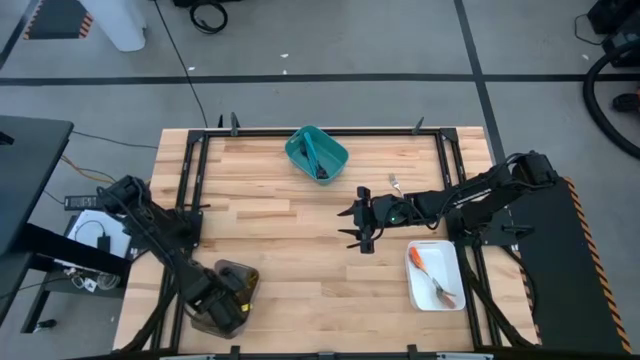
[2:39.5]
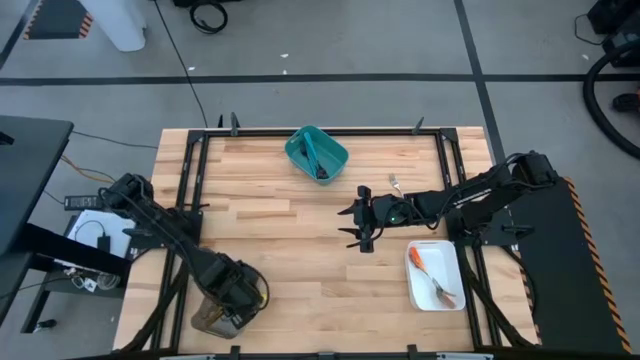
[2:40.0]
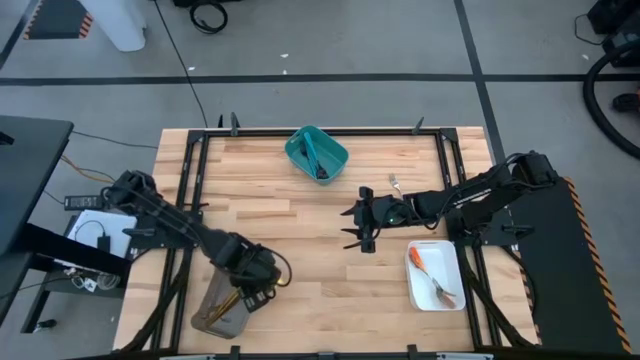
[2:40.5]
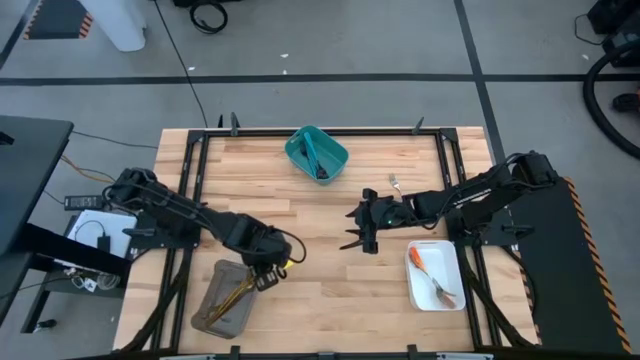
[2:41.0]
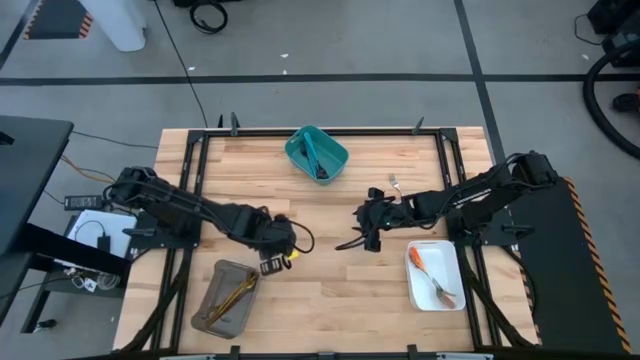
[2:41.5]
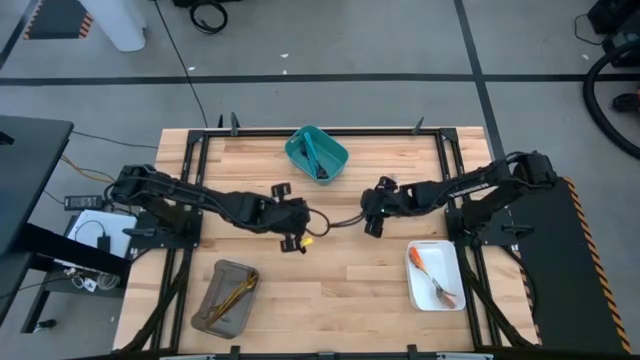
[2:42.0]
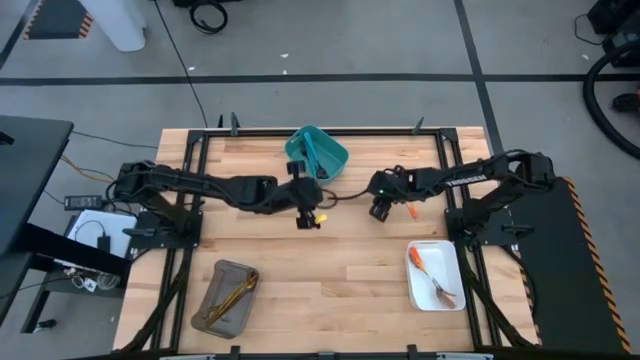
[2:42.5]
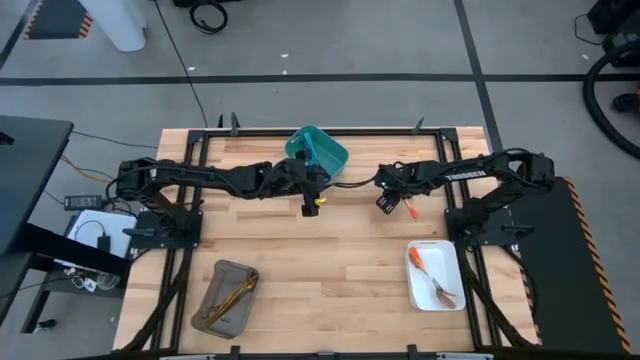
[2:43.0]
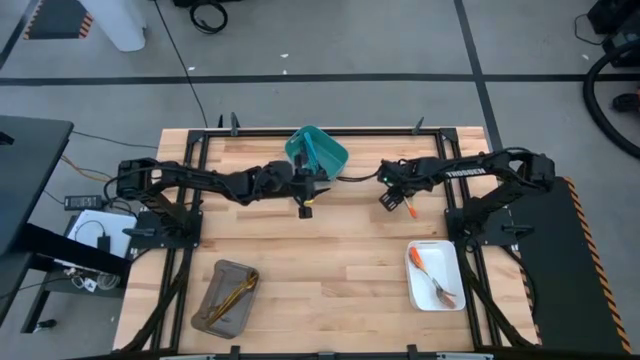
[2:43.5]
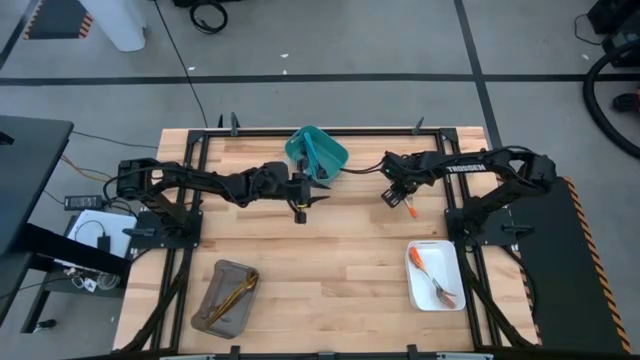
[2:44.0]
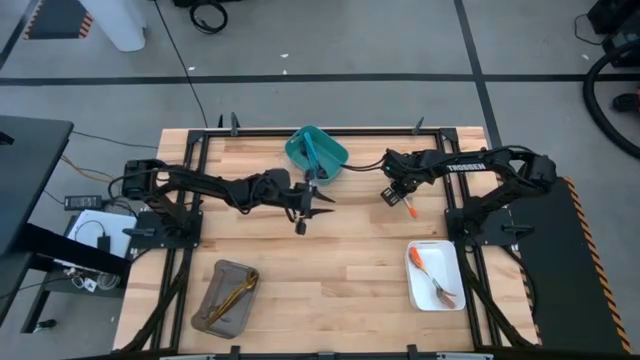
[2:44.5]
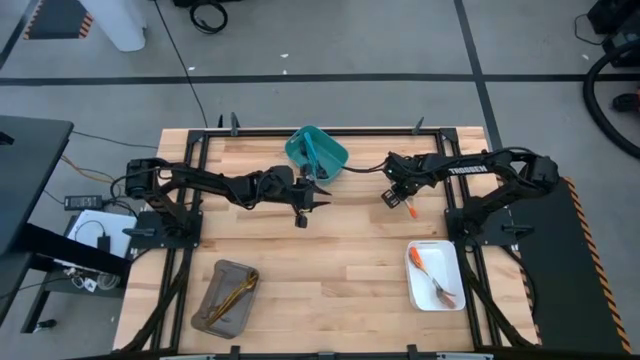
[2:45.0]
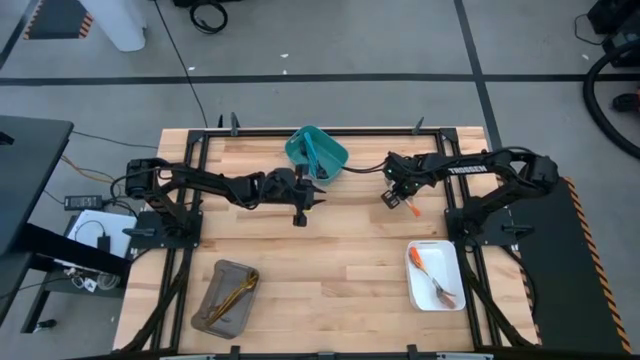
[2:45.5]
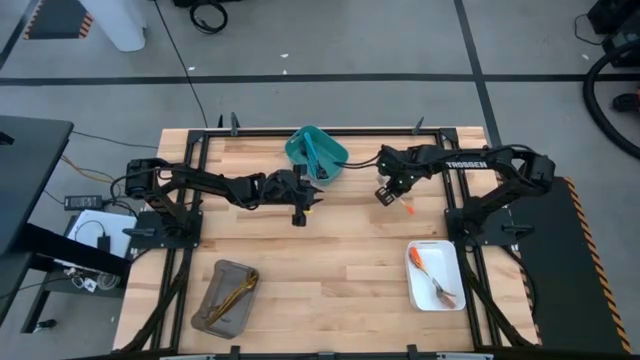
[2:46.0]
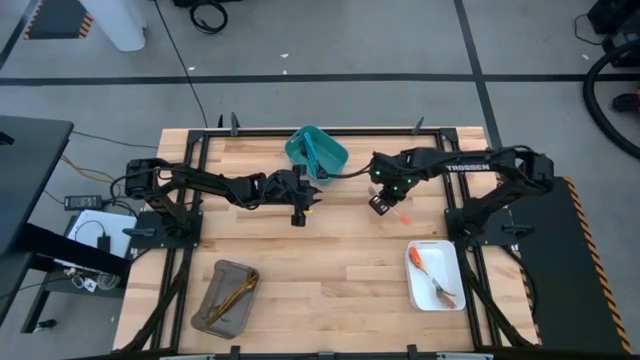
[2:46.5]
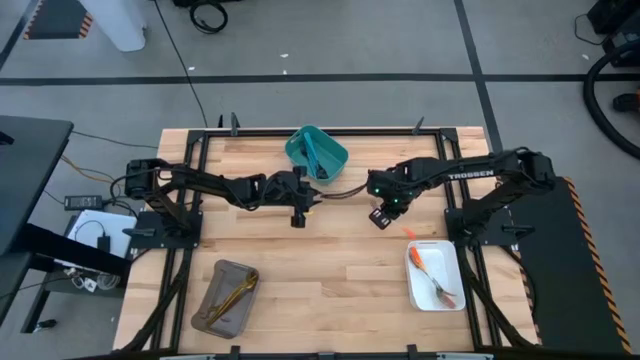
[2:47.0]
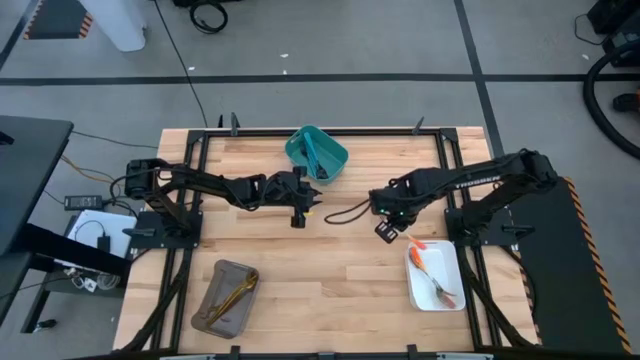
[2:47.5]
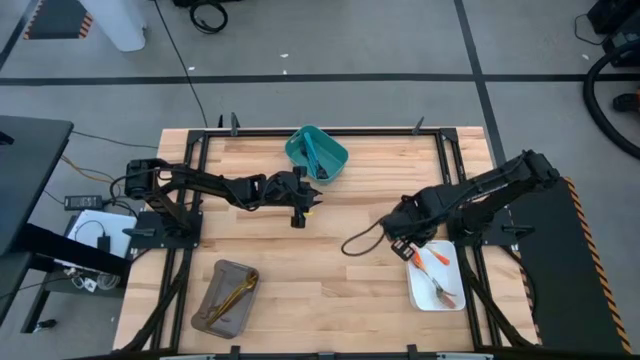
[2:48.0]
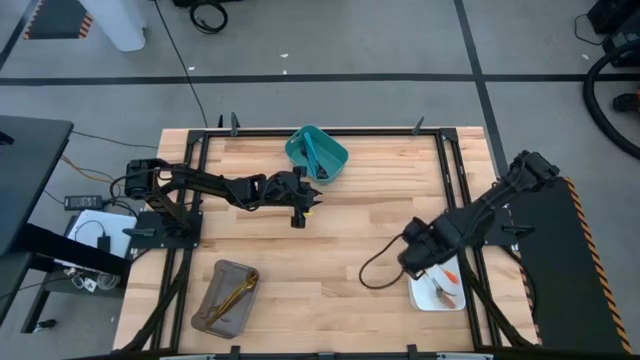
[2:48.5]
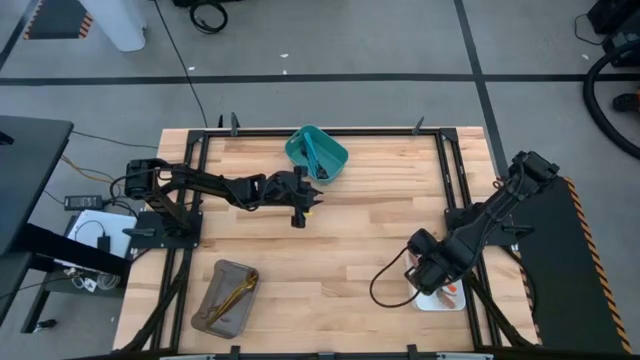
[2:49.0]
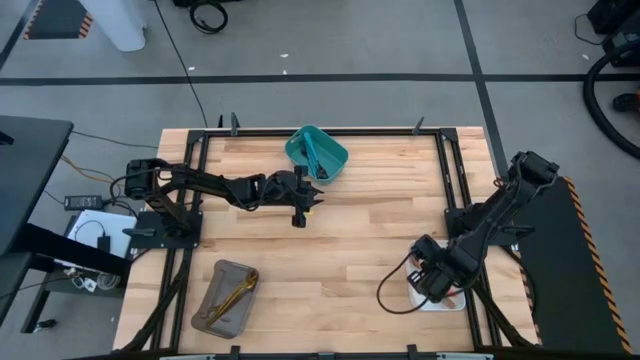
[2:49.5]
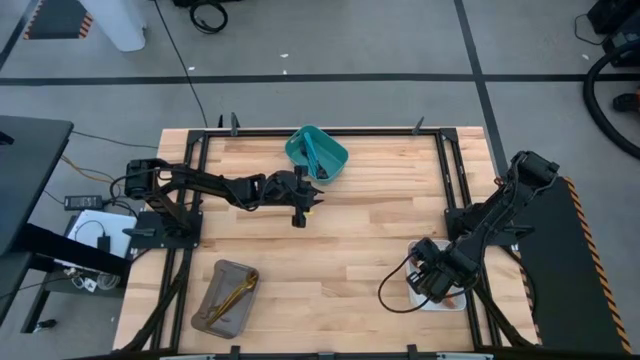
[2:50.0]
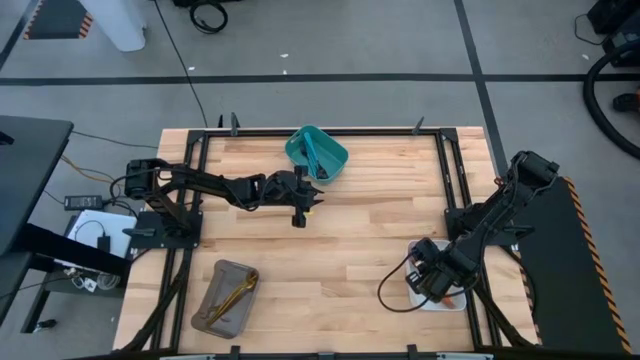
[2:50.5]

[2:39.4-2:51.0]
Task: Sort silverware by color (type)
Put the orange fork into the white bin

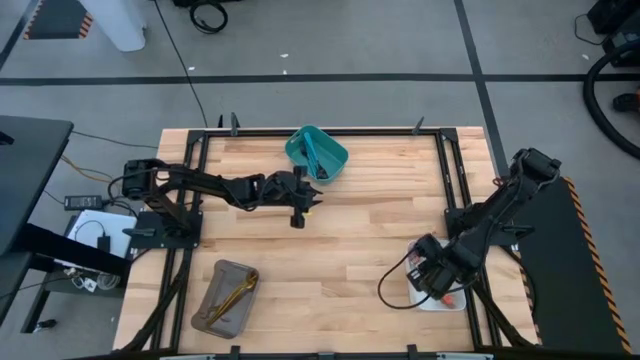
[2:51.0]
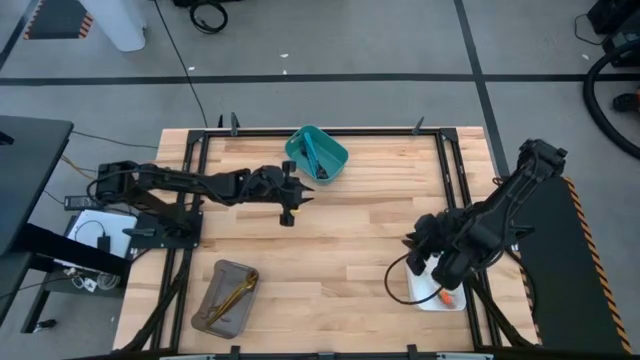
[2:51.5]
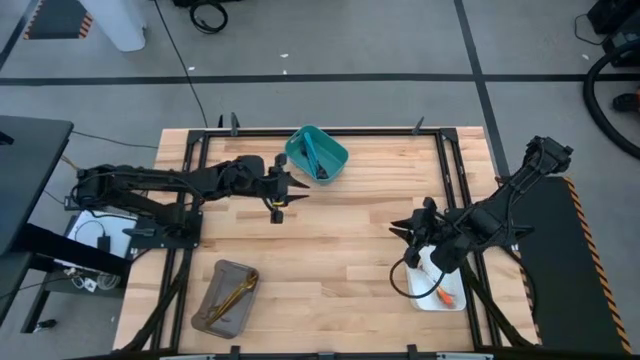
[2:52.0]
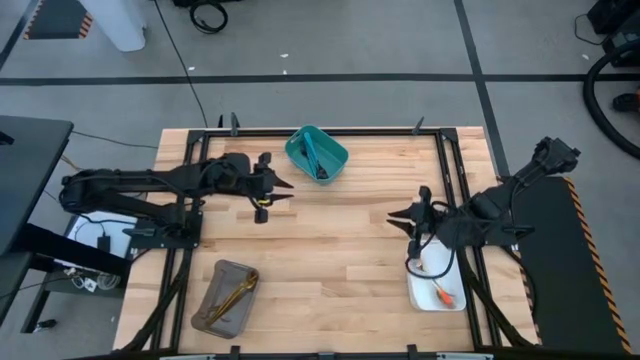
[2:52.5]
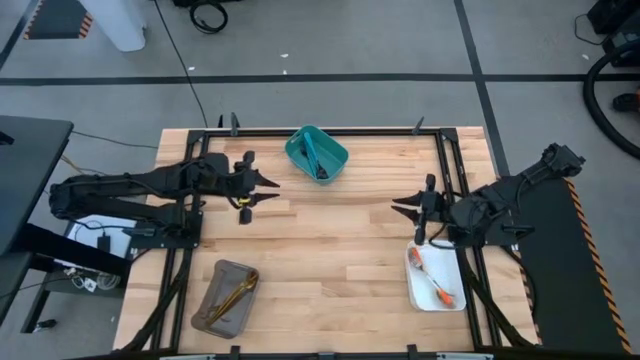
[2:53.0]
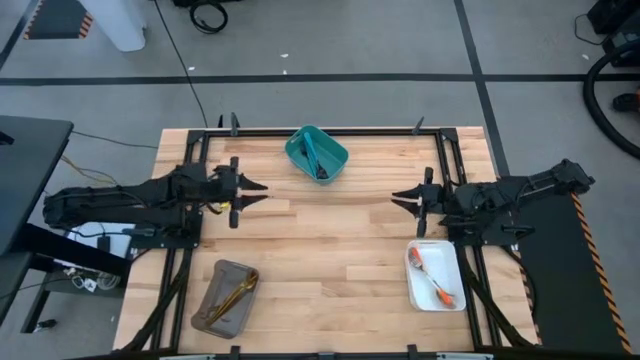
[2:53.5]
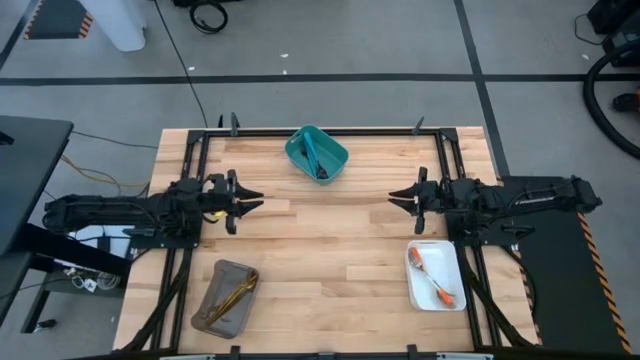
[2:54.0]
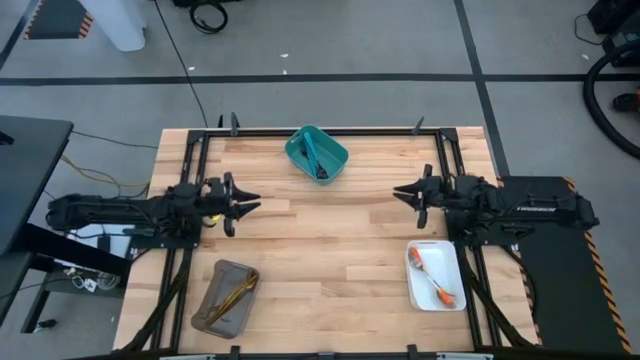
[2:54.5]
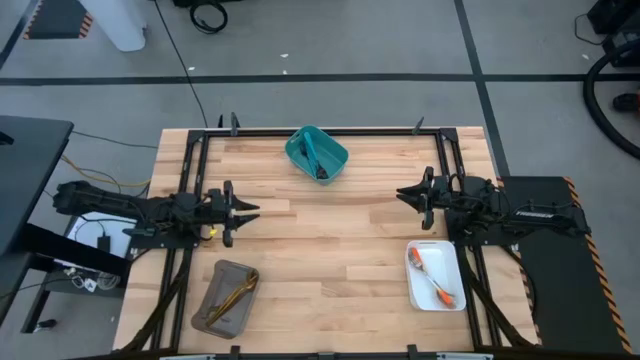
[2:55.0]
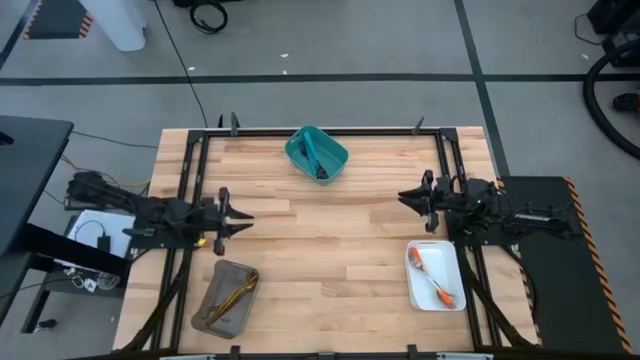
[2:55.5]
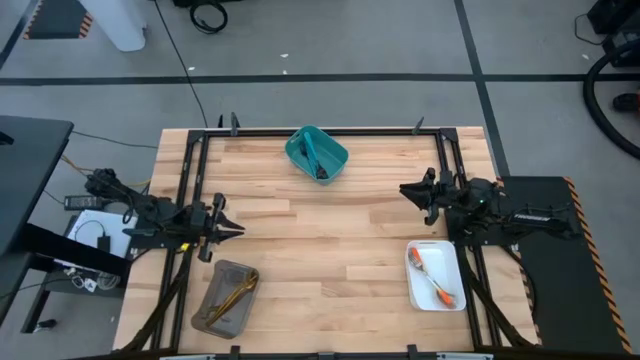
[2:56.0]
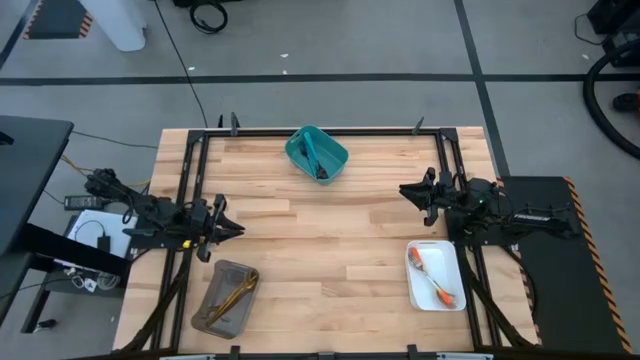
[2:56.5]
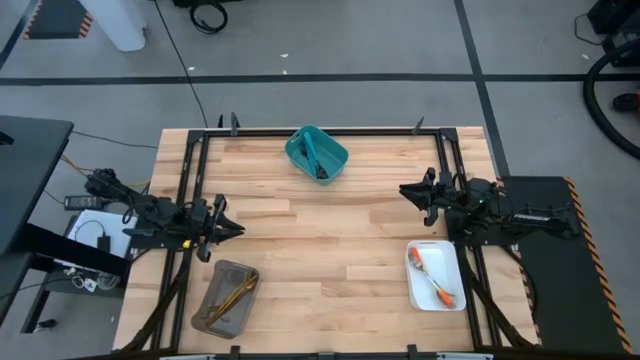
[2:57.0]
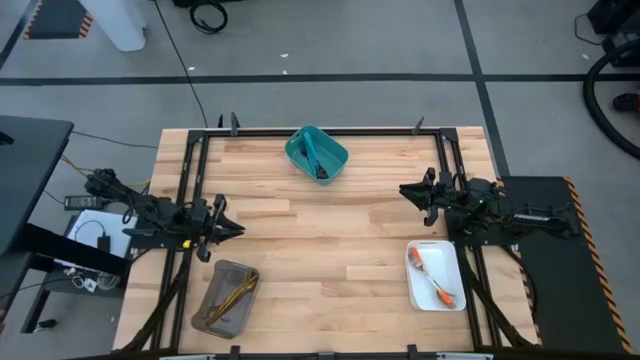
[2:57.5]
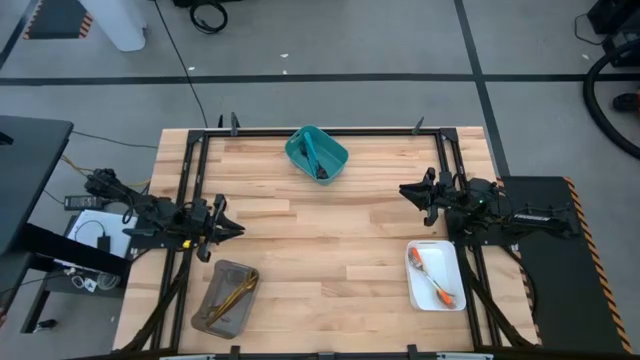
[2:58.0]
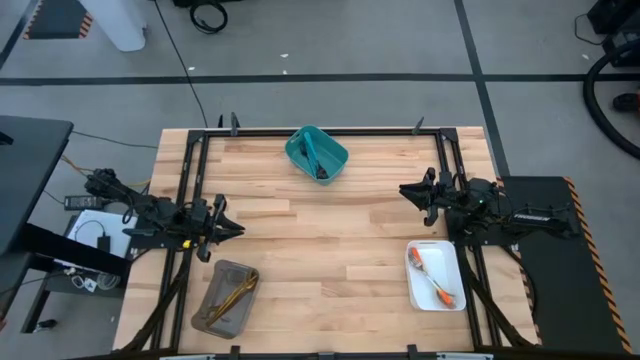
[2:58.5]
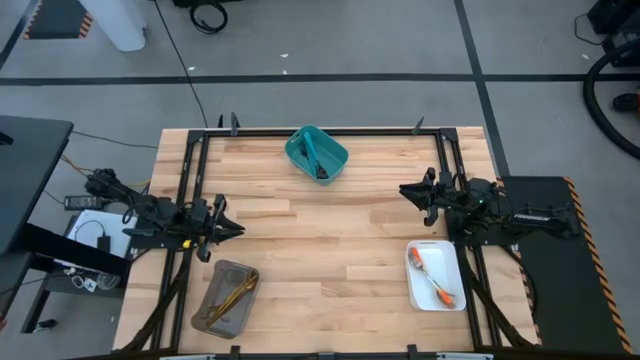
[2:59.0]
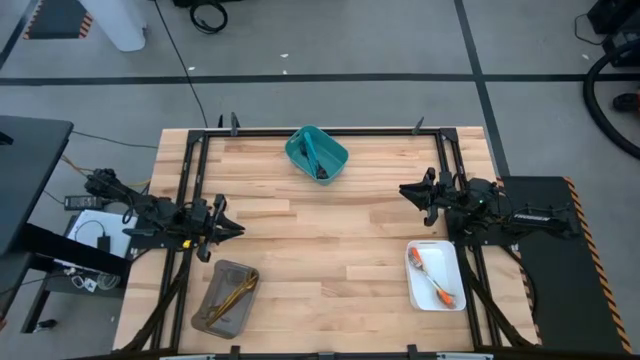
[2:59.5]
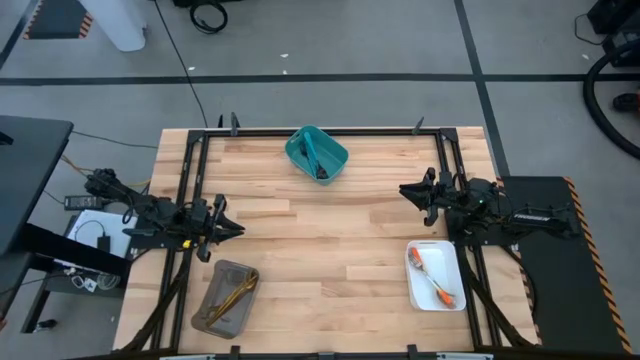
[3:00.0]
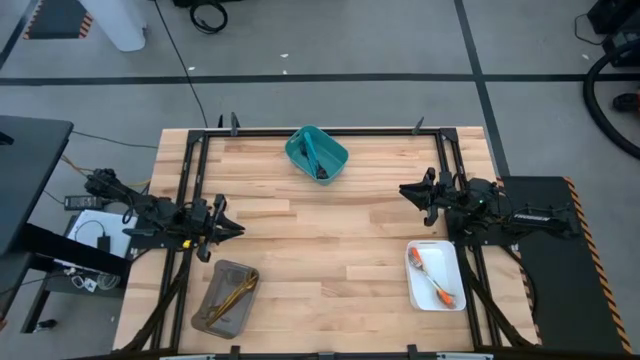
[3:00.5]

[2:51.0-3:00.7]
Return to Home Position

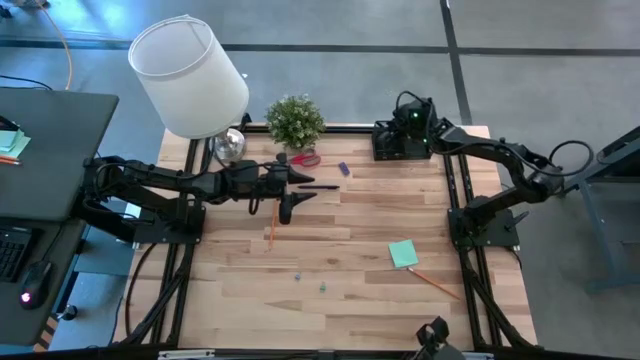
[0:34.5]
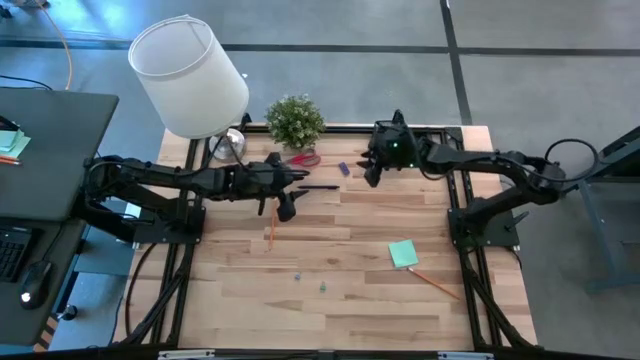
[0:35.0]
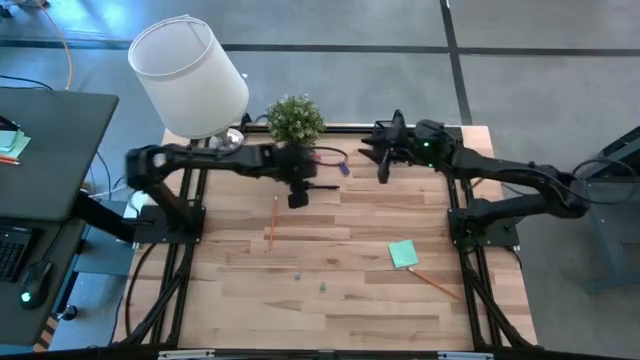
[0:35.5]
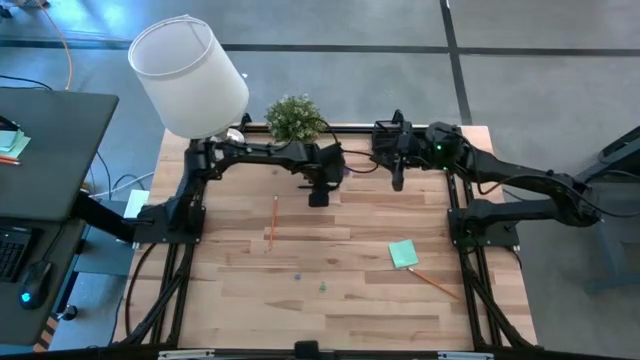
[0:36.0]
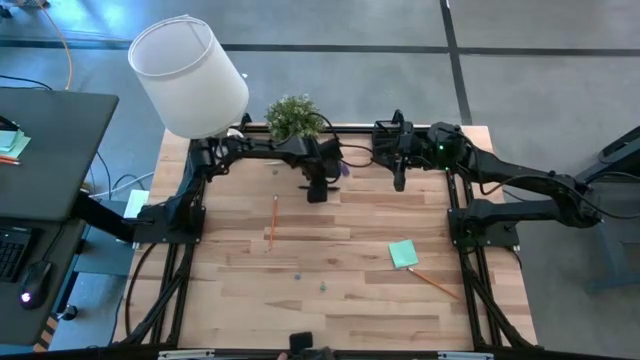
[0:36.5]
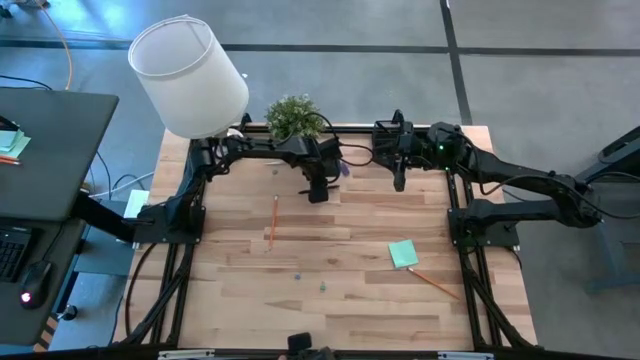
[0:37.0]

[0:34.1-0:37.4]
Task: Pick and place office supplies into organizer
Put the black pen in the black desk organizer
